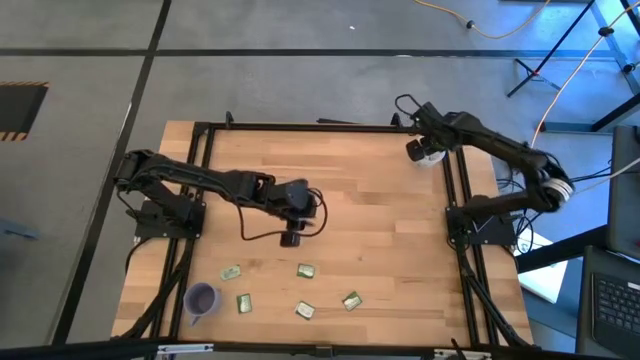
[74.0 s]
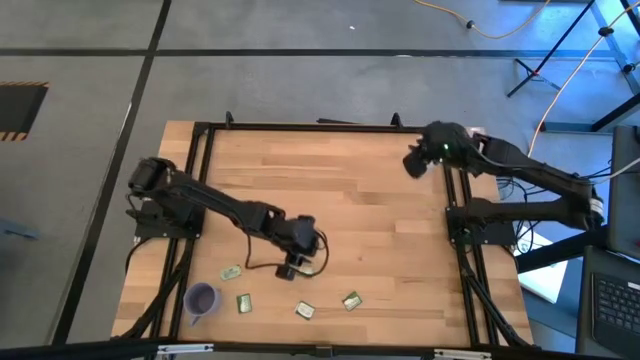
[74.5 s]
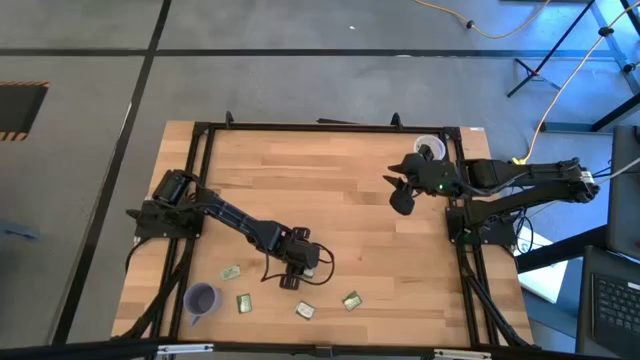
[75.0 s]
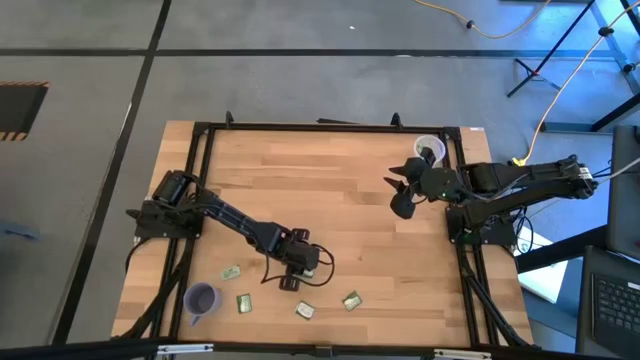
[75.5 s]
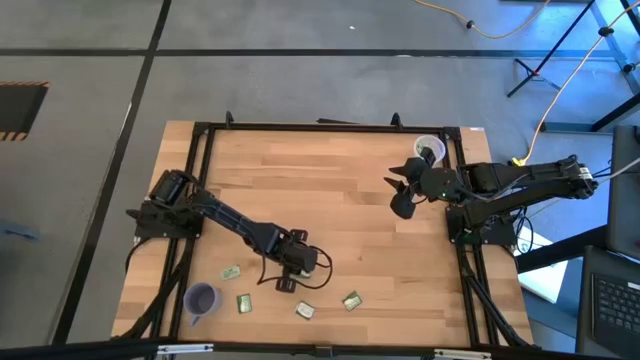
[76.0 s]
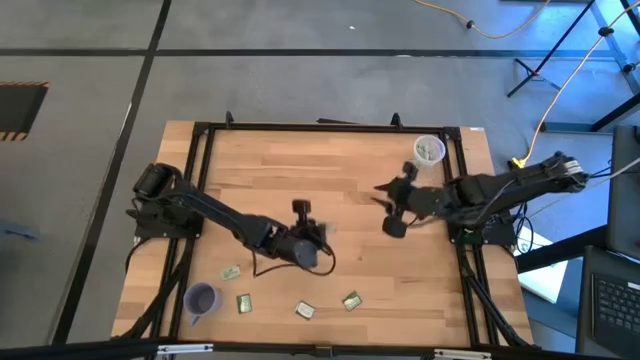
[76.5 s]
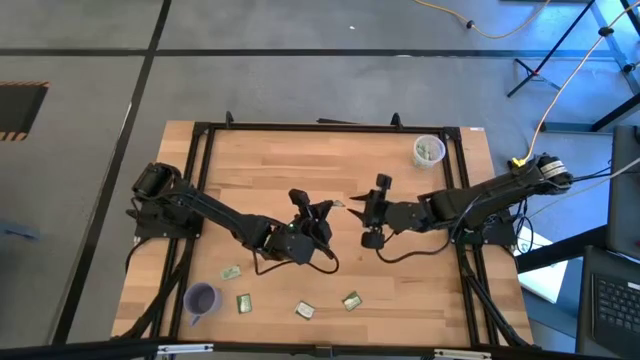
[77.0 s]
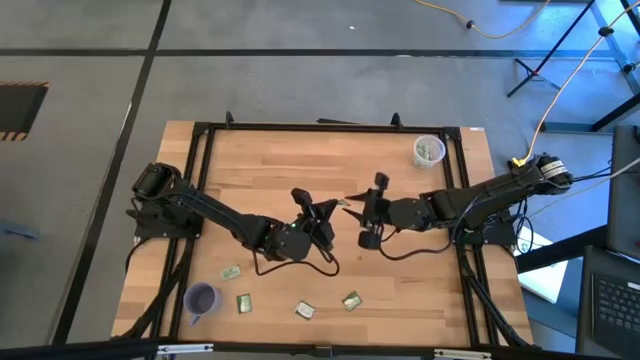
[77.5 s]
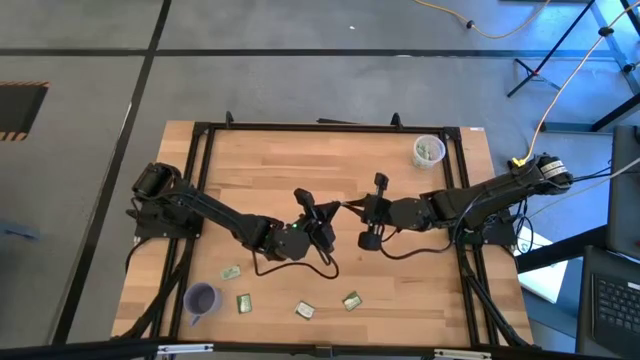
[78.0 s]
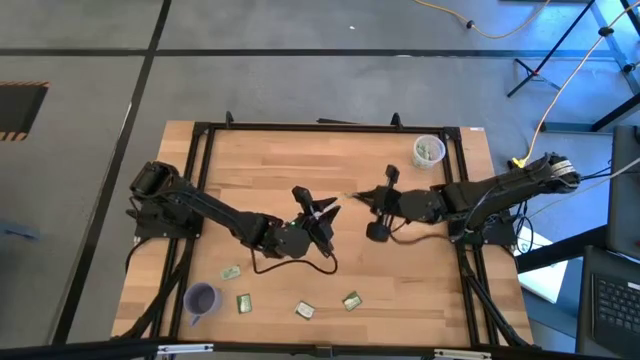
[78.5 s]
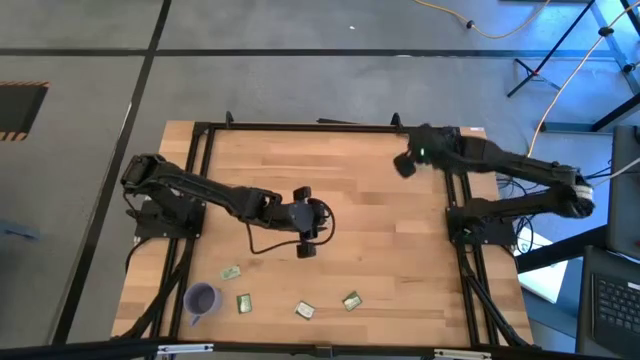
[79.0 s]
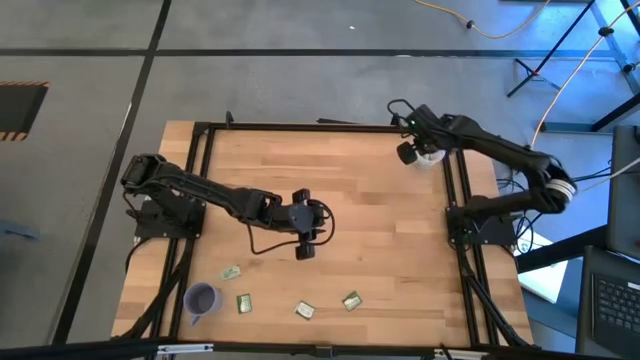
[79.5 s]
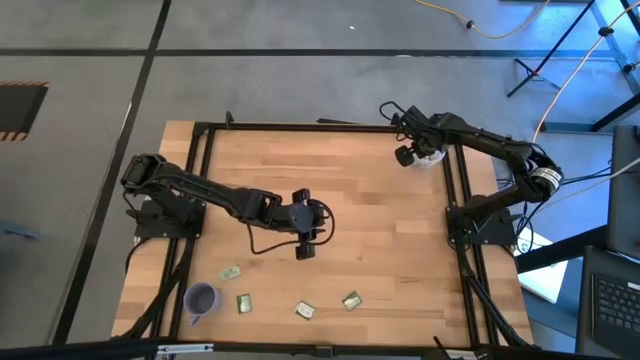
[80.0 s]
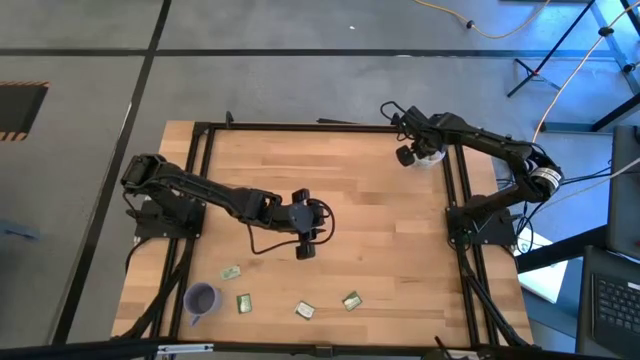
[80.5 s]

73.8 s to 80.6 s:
Task: Pick and place Stevia / Truvia into bins
Put the green stevia packet into the transparent container

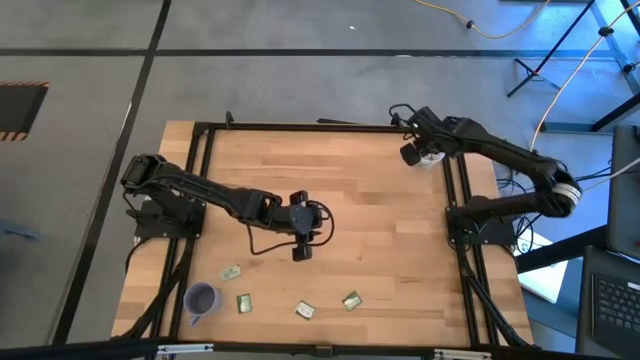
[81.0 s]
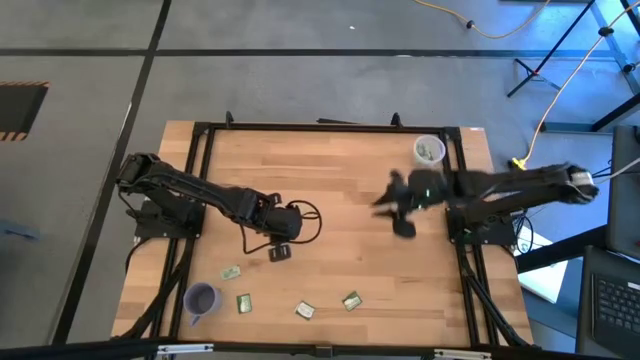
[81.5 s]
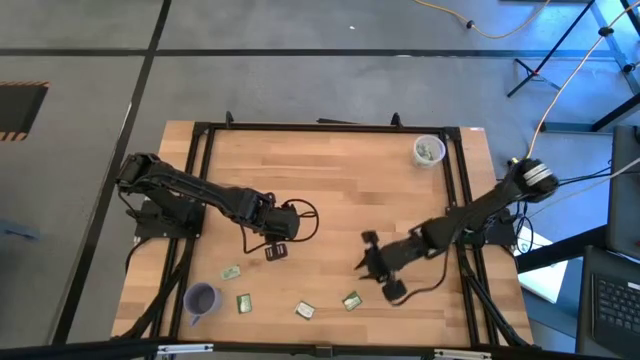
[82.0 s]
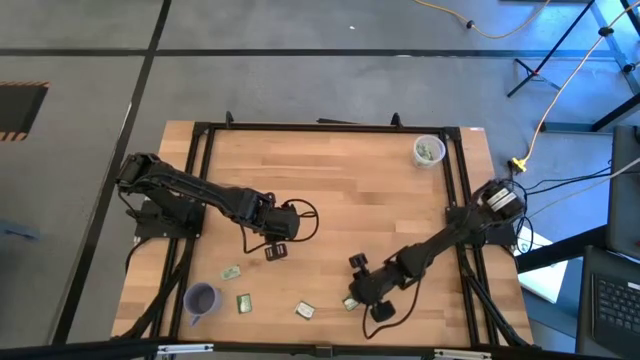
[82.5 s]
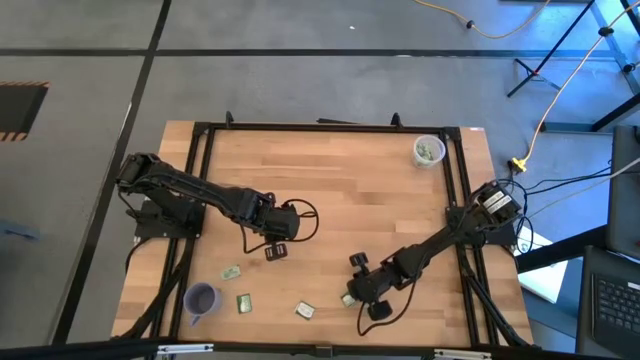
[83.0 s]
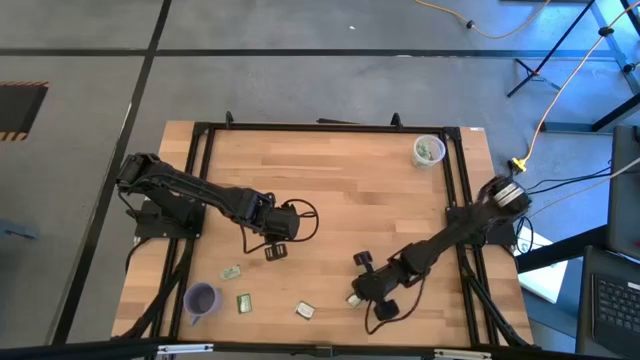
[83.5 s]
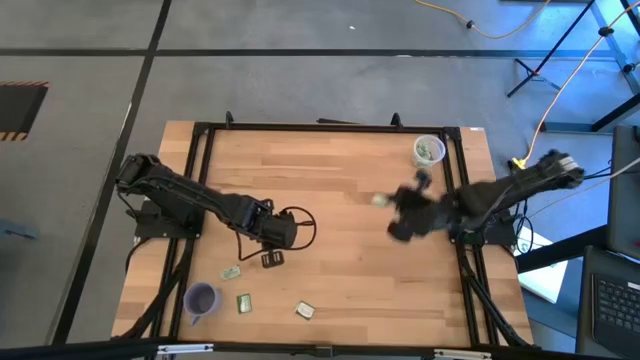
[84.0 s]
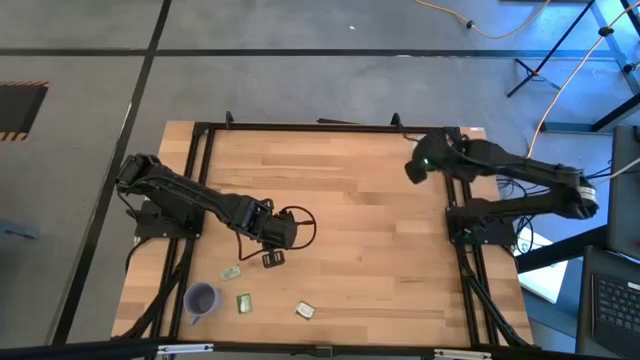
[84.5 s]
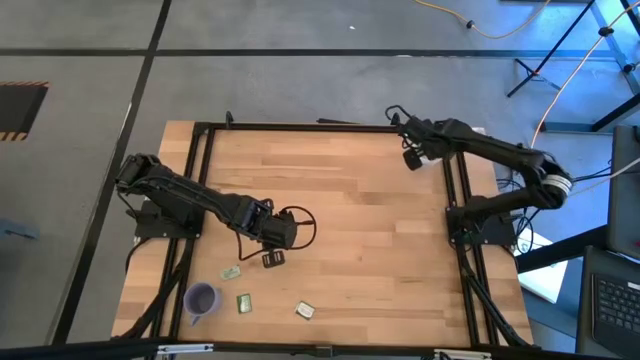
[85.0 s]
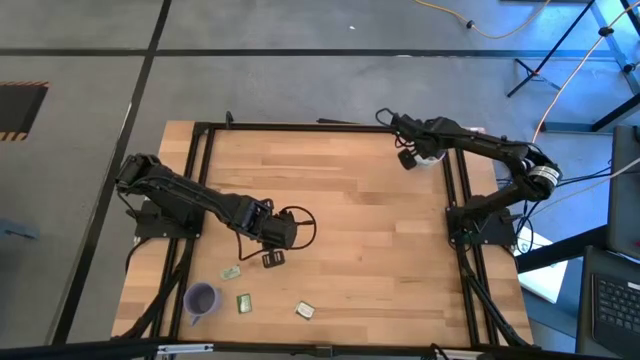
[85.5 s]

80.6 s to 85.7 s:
Put the right green stevia packet into the transparent container

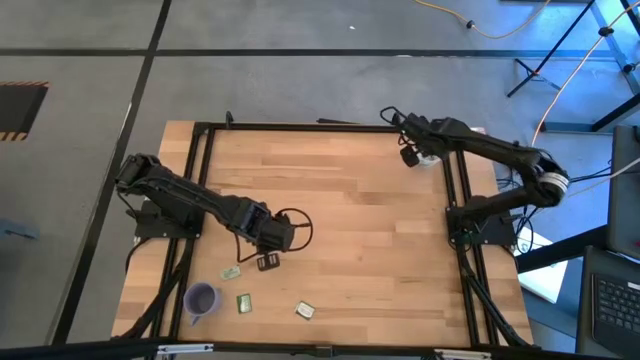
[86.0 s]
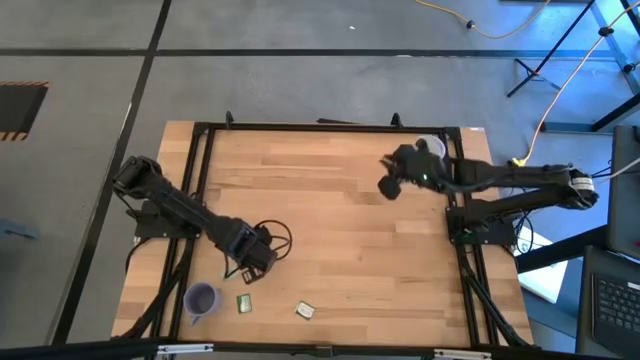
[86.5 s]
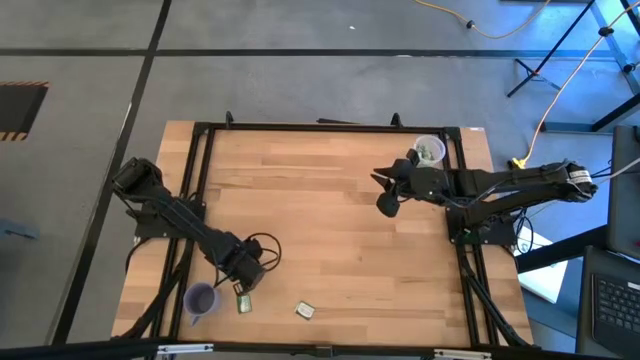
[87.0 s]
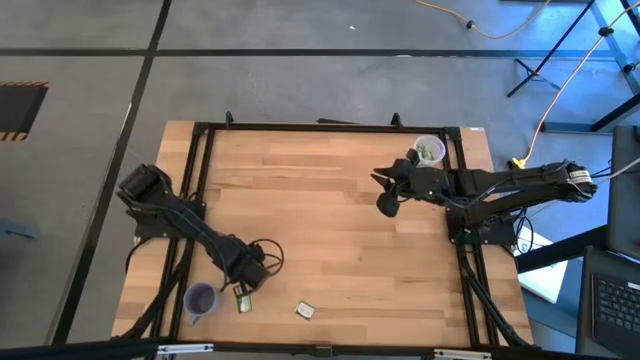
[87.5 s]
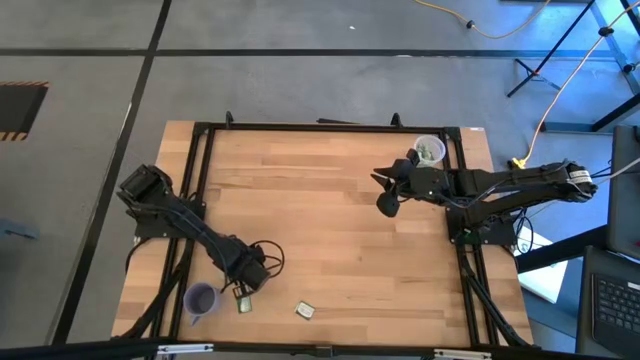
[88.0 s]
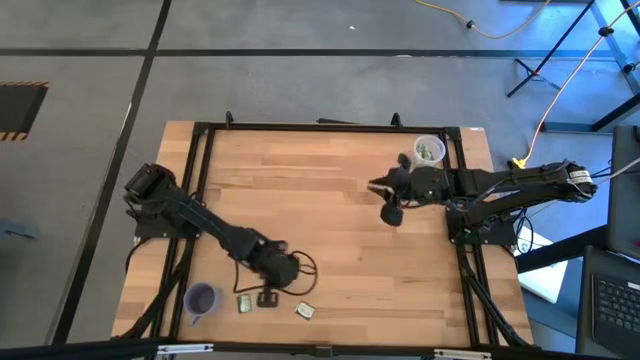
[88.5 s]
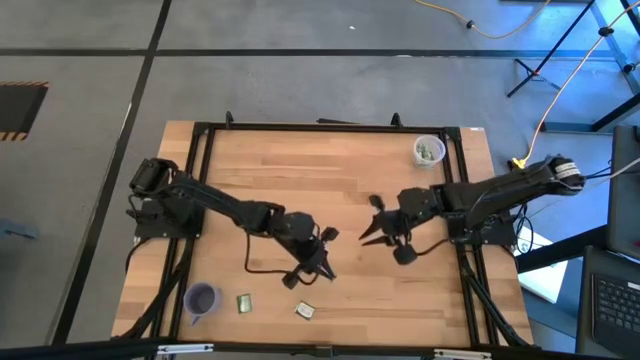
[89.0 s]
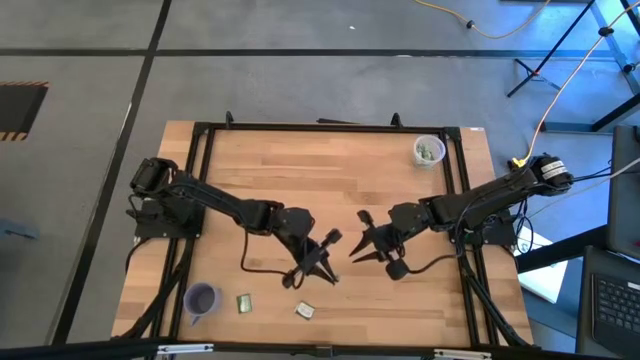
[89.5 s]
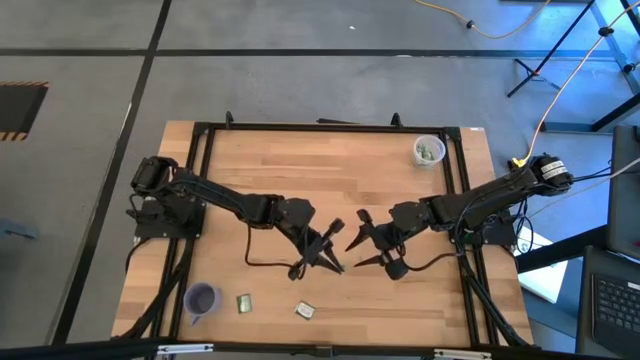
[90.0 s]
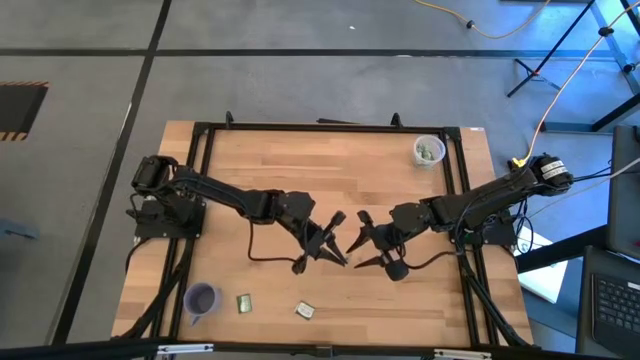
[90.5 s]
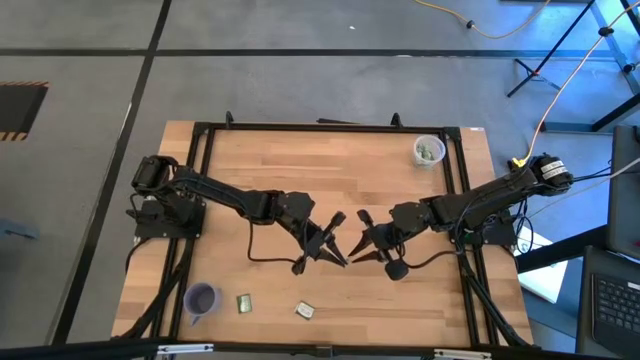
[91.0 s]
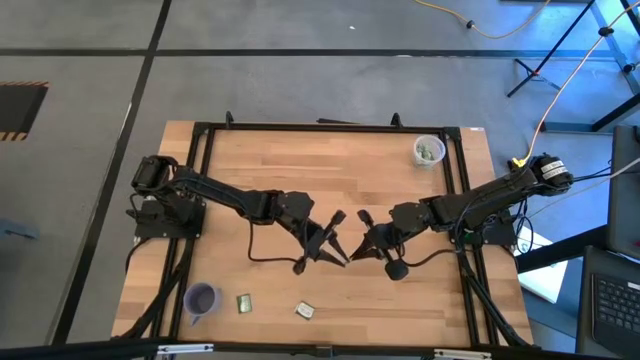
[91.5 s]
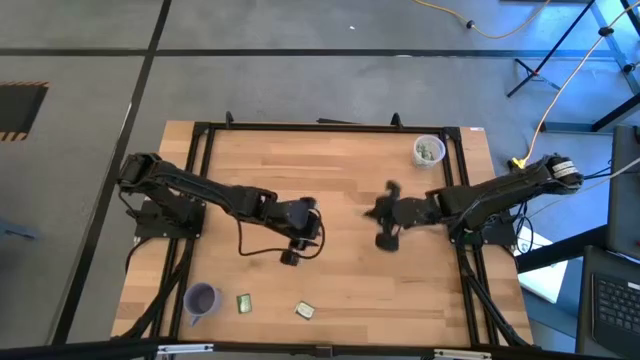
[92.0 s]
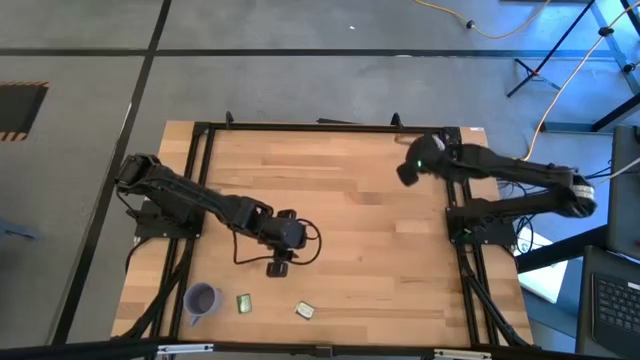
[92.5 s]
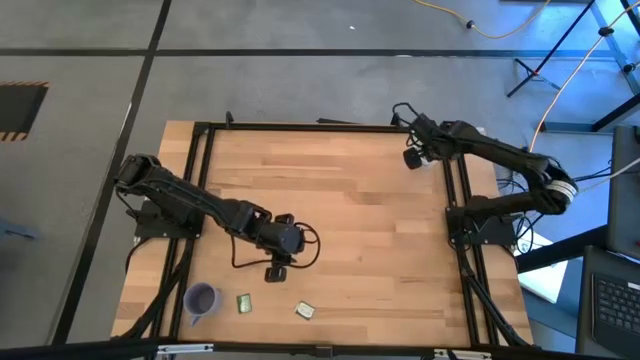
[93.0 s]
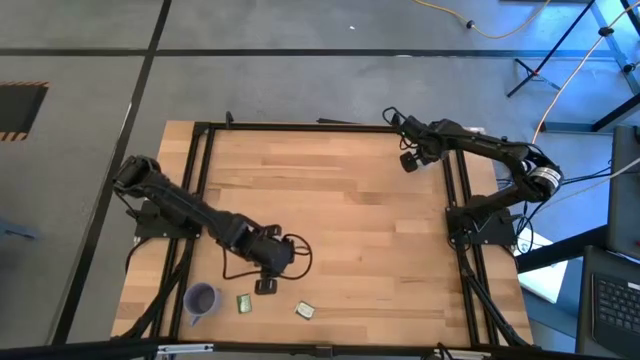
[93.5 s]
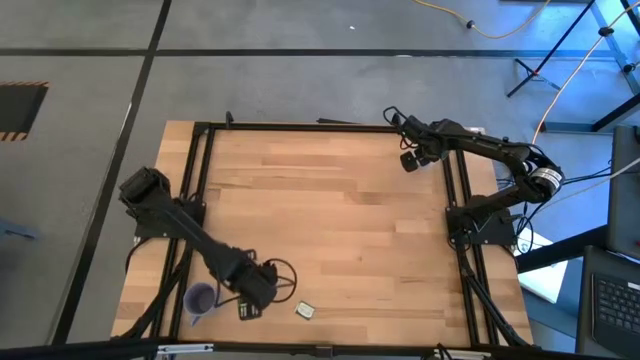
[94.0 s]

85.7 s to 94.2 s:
Put the light green stevia packet into the transparent container

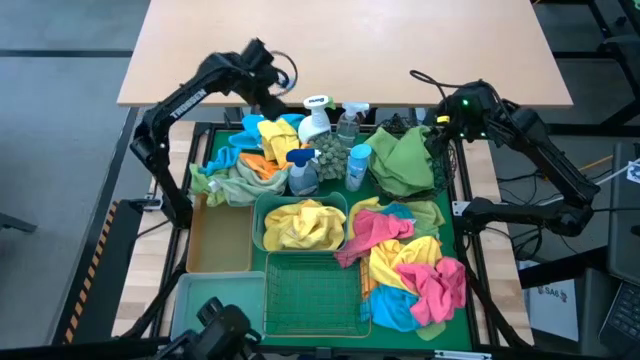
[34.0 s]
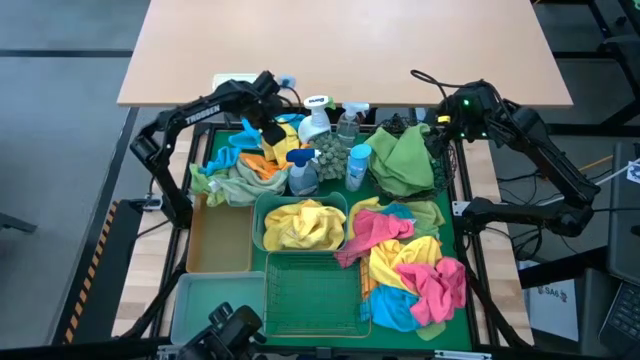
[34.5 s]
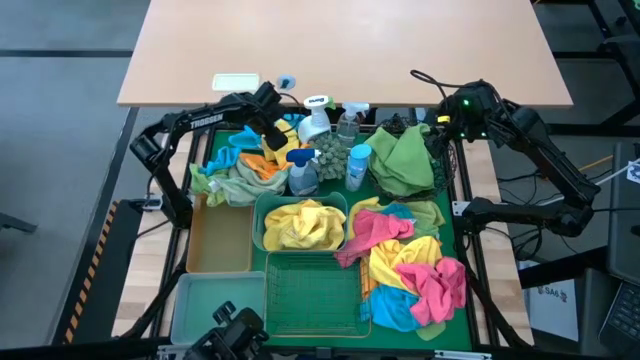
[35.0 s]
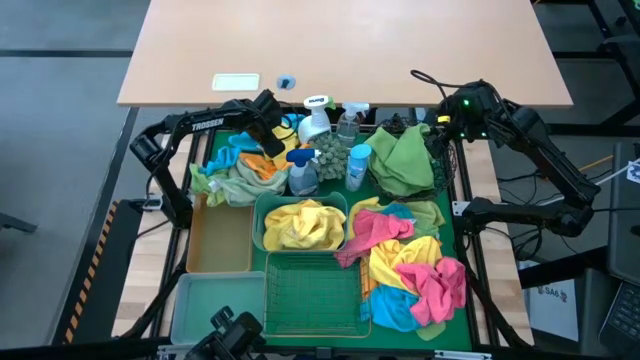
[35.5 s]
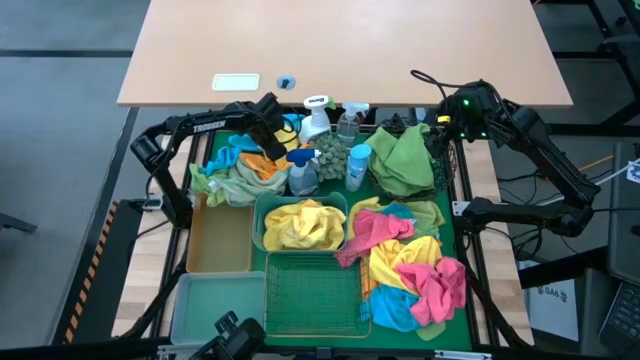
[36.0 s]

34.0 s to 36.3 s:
Task: Sort microfiber towel by color & place in baskets
Put the yellow microfiber towel into the blue bin
